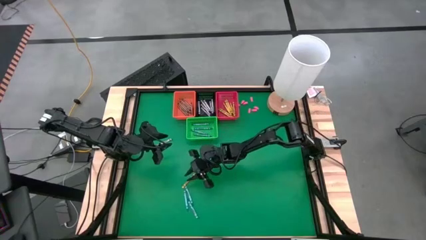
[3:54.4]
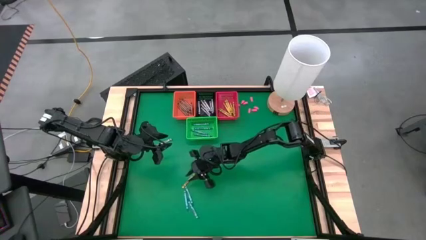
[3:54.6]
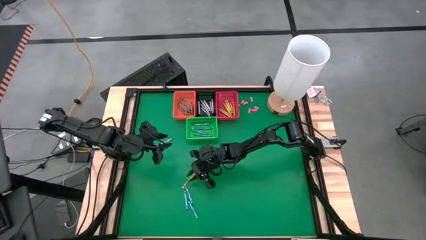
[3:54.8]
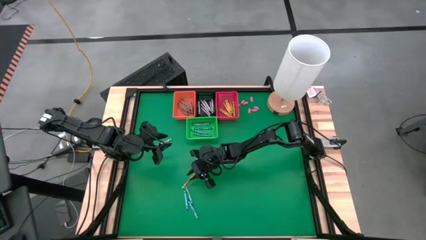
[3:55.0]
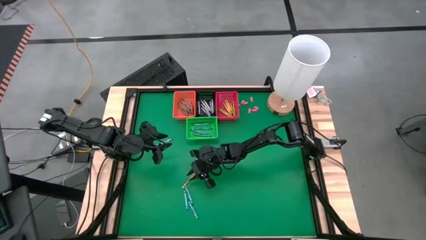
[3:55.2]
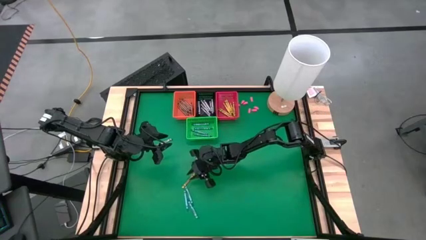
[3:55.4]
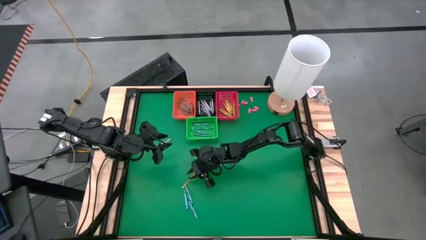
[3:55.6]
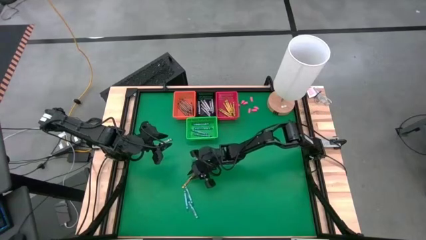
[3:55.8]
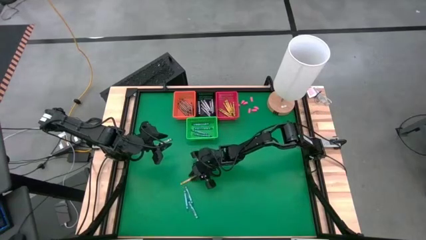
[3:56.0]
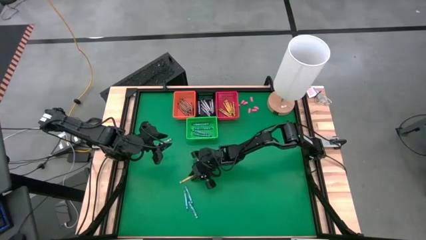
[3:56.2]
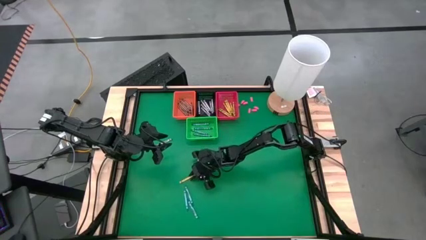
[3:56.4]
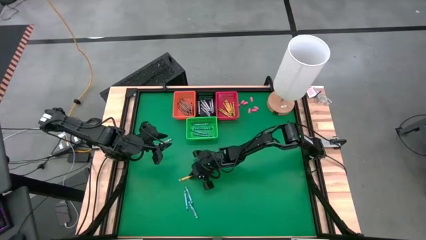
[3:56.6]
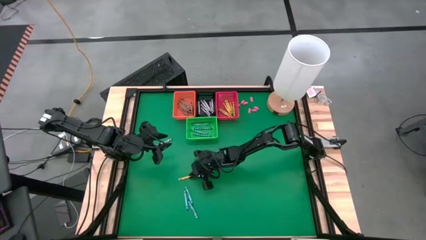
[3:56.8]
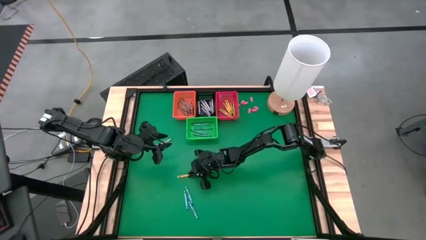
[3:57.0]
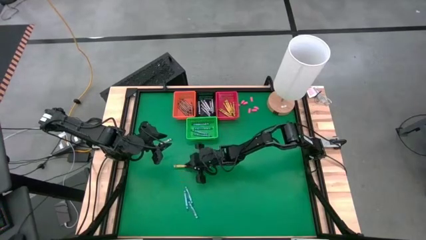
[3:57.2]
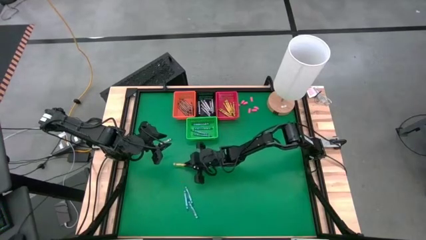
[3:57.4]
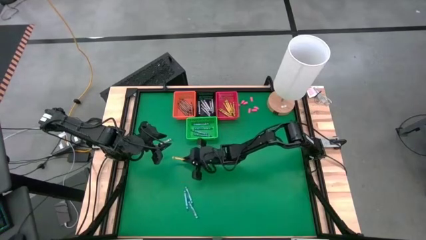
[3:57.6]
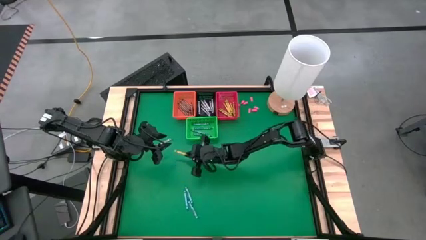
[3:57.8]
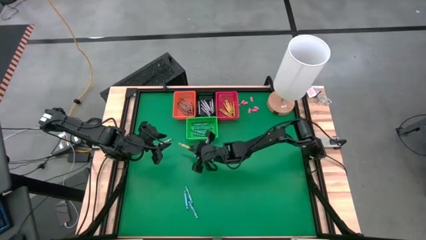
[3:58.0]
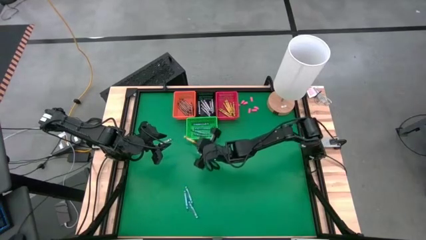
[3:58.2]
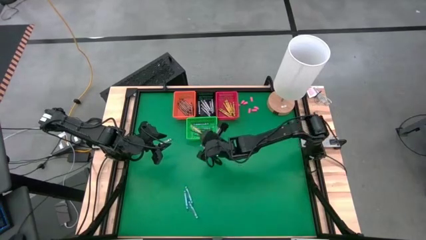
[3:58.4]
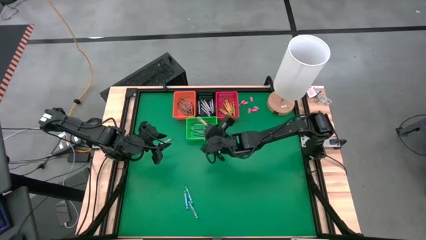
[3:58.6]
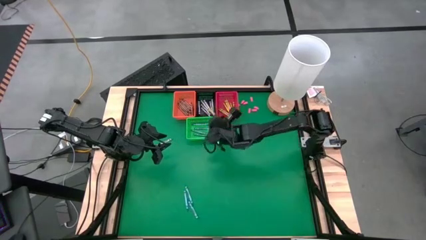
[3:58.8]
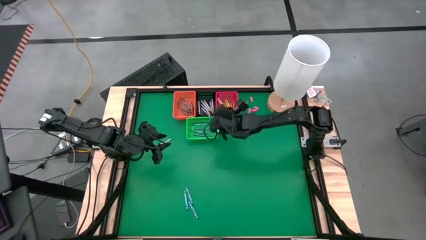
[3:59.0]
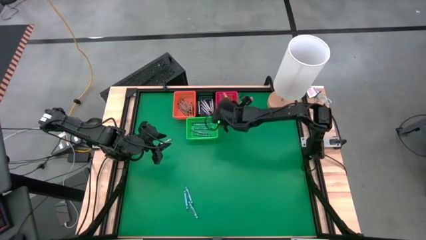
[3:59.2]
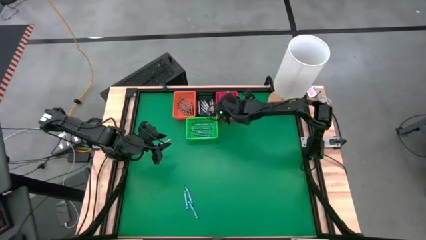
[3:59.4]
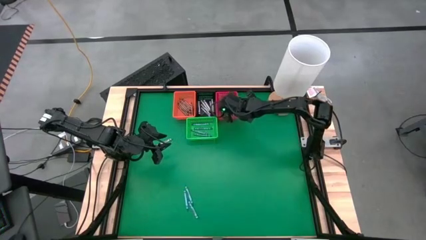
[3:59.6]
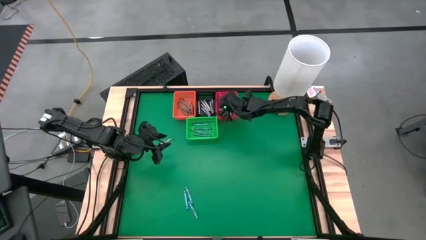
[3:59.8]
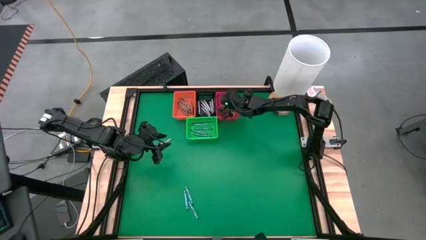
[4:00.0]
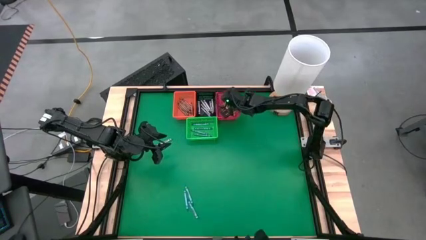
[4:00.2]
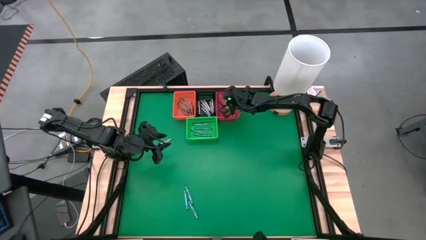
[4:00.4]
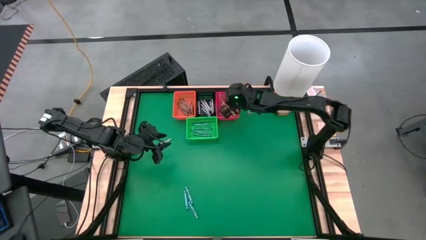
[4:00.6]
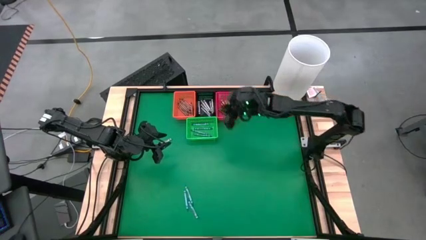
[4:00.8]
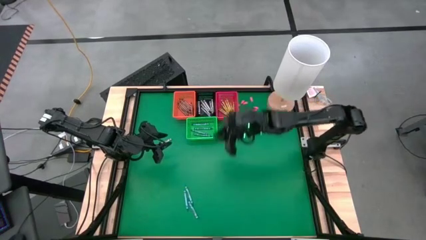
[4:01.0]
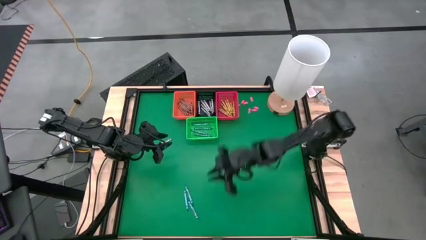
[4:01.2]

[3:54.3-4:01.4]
Task: Sort crayons
Put a yellow crayon in the red basket

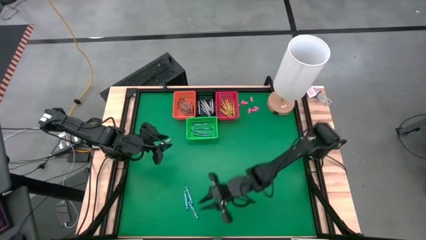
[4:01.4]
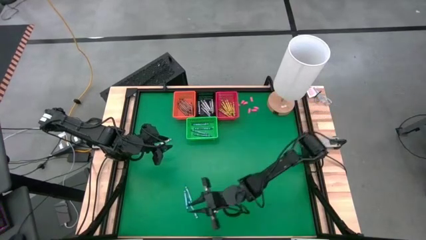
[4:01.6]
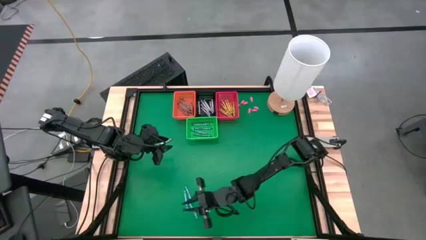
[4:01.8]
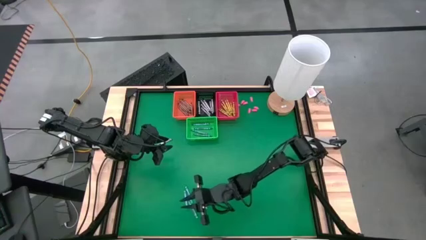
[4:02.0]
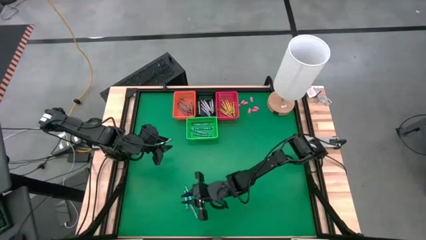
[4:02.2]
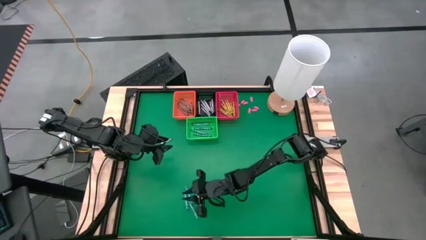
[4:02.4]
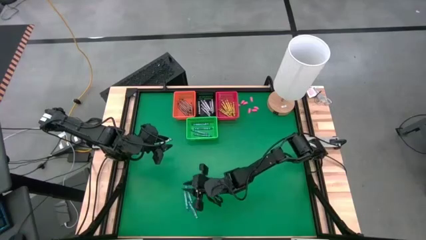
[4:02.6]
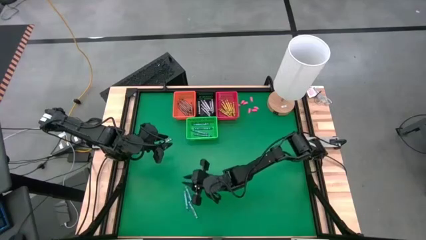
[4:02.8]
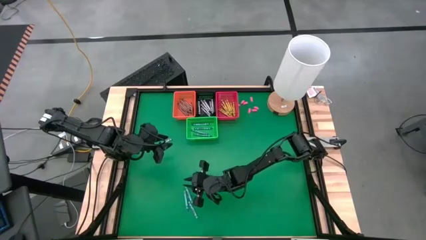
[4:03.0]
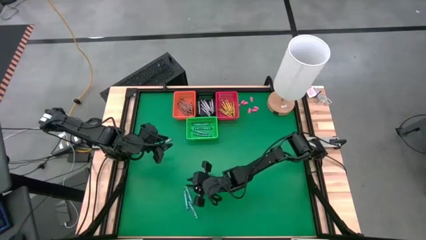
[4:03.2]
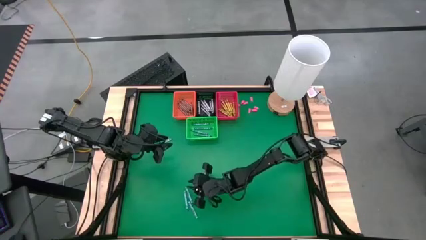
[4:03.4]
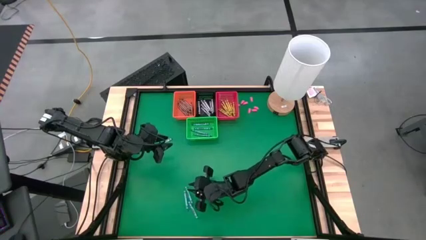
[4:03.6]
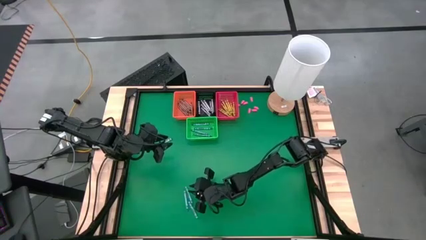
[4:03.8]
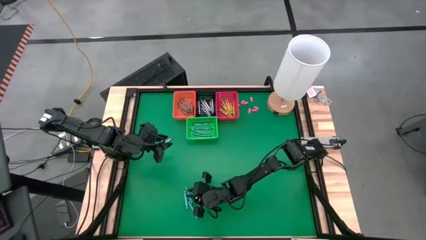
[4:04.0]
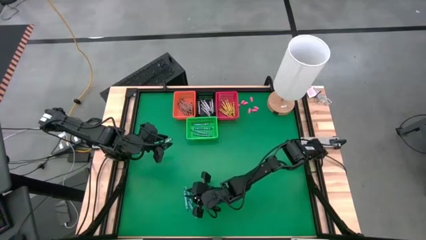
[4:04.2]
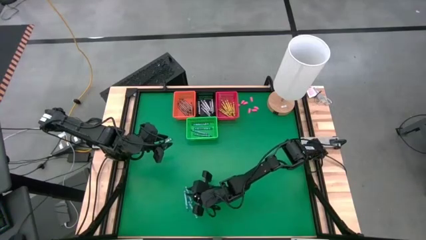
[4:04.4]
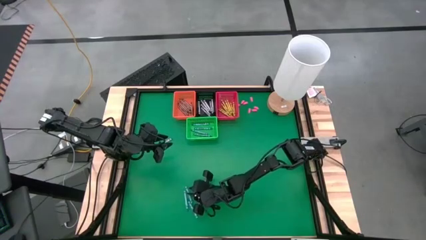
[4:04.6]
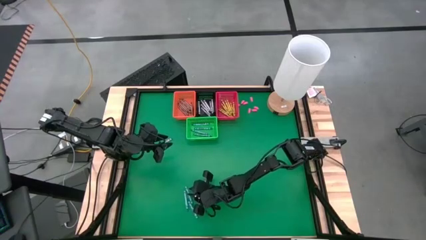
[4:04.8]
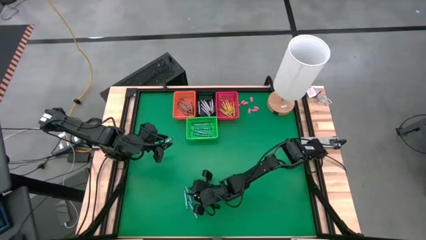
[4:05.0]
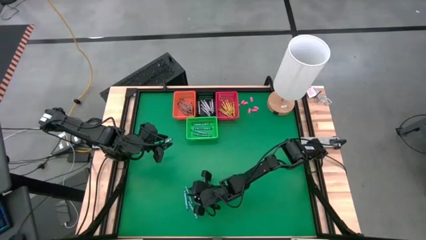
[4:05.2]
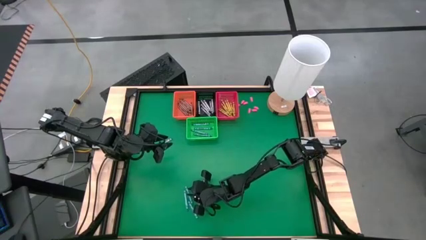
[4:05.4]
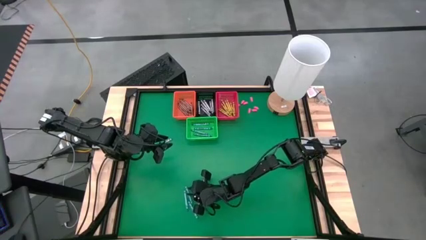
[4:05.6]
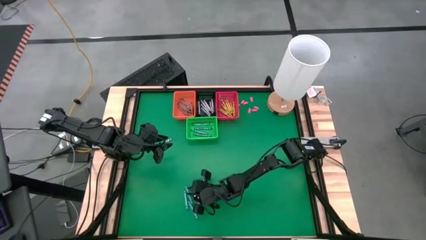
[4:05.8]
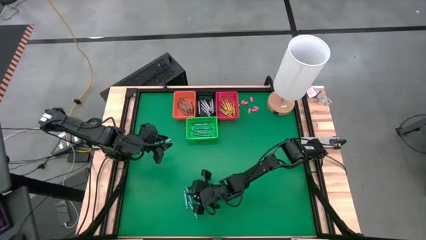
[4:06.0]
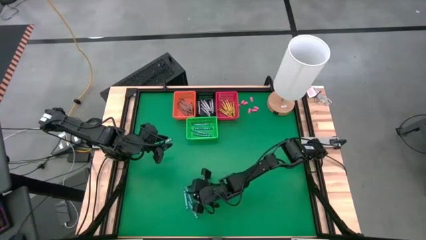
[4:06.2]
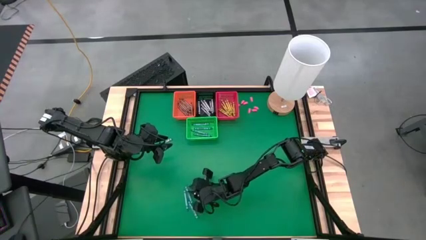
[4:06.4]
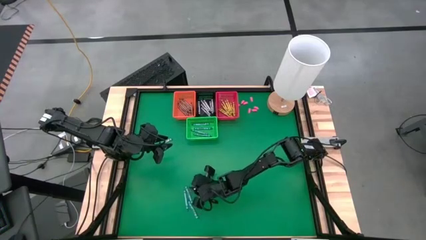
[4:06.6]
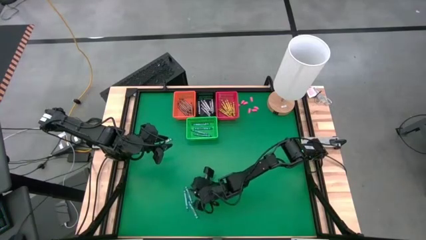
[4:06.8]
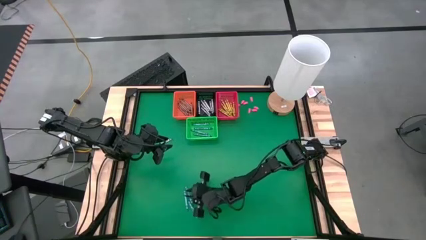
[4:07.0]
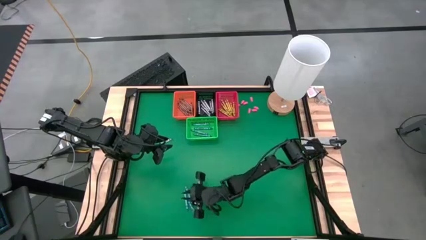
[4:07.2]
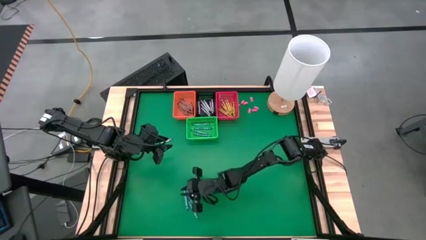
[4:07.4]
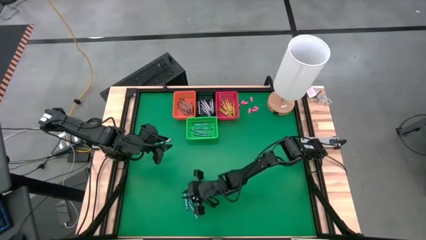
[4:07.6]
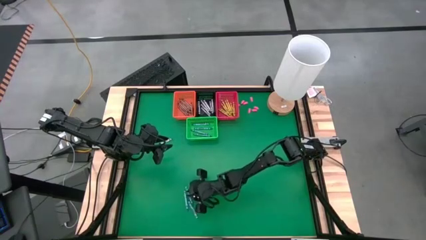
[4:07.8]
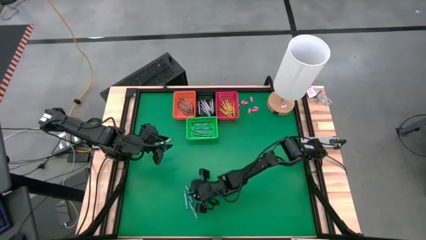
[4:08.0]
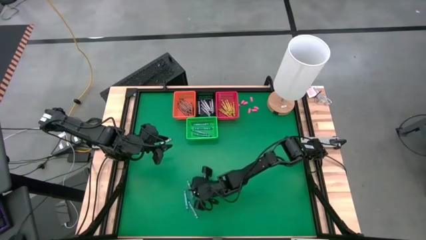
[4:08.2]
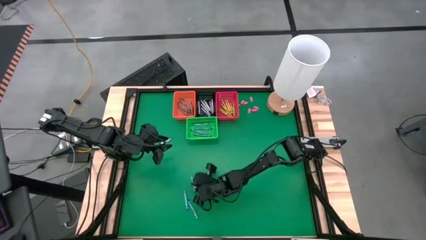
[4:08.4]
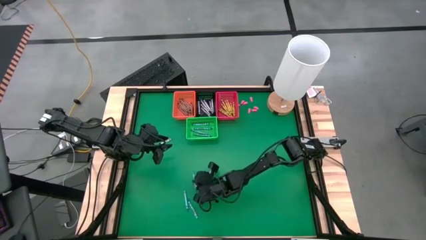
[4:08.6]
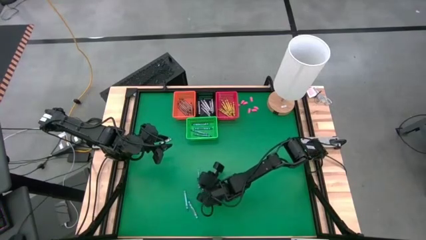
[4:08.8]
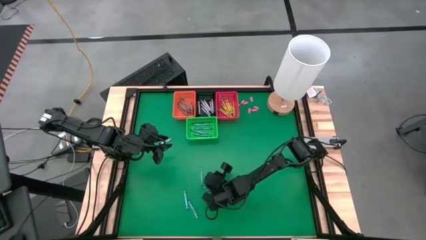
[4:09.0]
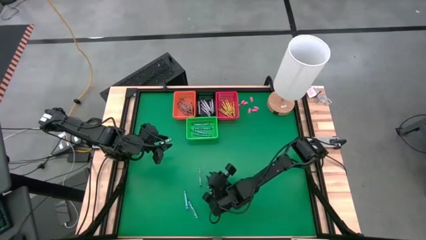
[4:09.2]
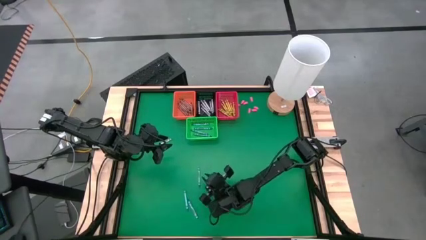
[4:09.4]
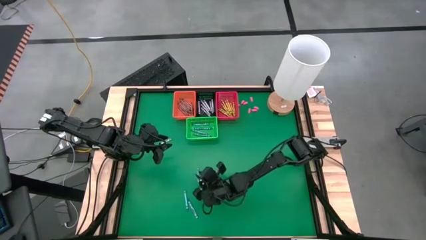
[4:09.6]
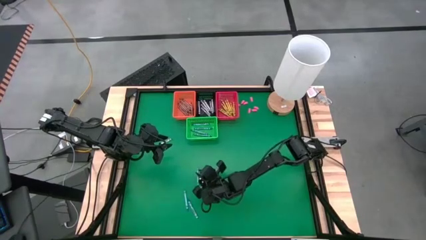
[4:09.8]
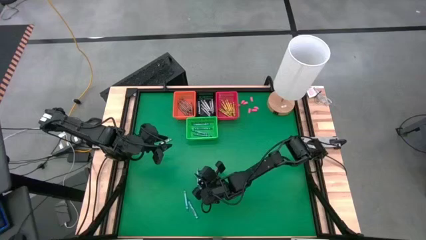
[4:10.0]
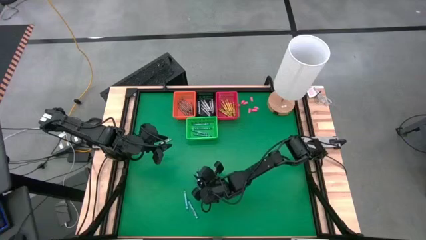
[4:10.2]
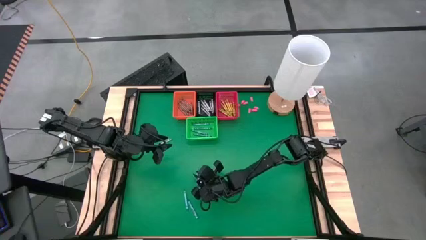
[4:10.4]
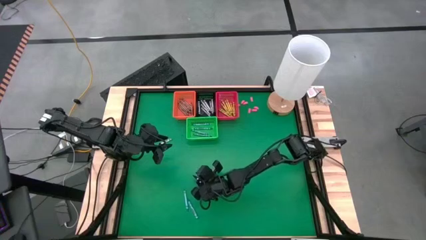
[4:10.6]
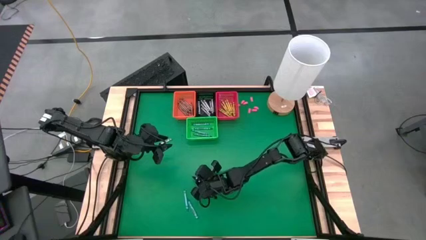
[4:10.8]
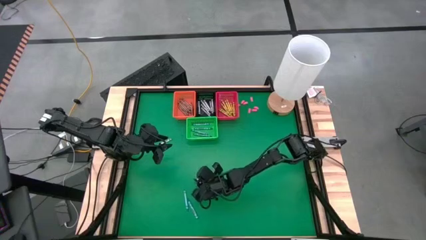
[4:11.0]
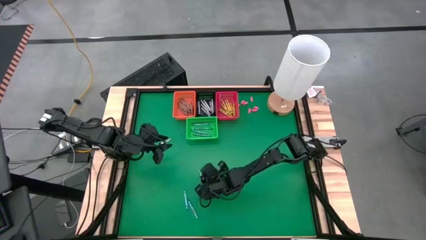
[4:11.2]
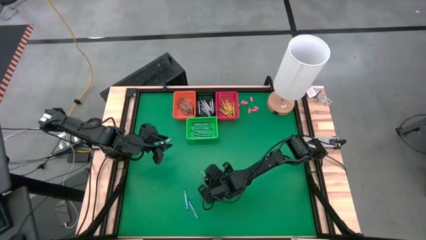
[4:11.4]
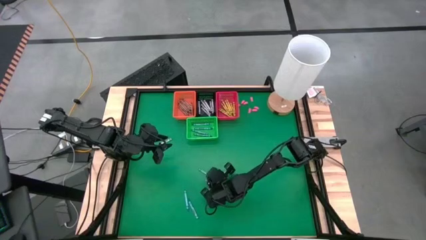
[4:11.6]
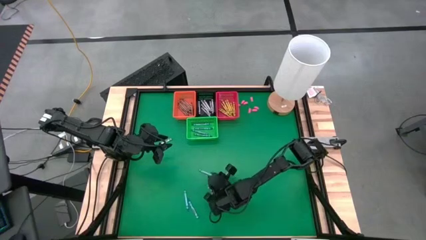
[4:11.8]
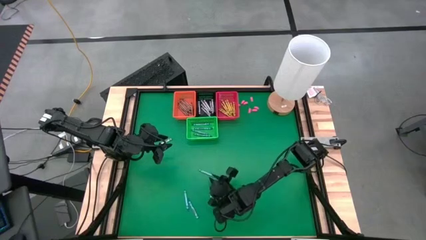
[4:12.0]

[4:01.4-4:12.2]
Put a blue crayon in the green basket
